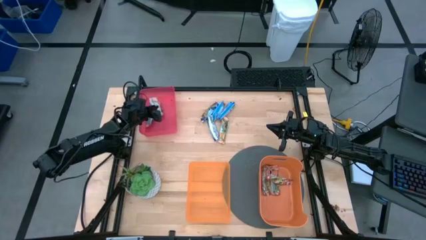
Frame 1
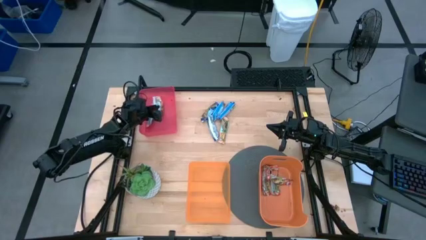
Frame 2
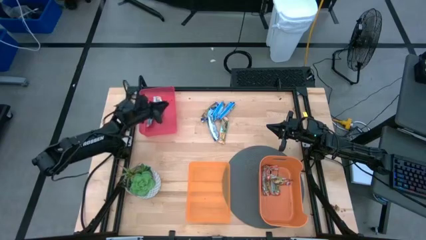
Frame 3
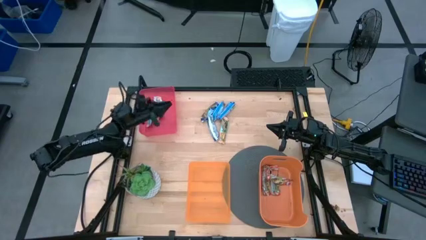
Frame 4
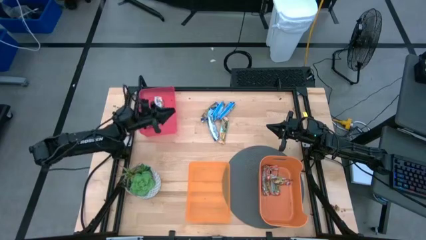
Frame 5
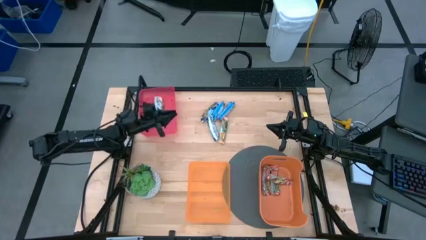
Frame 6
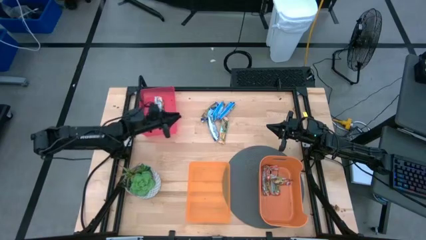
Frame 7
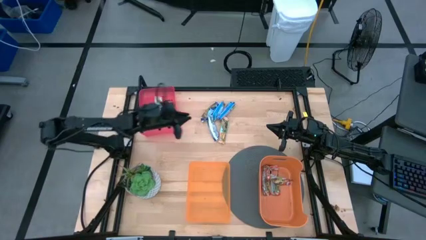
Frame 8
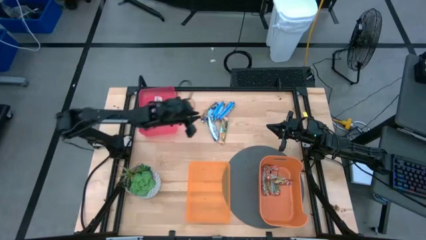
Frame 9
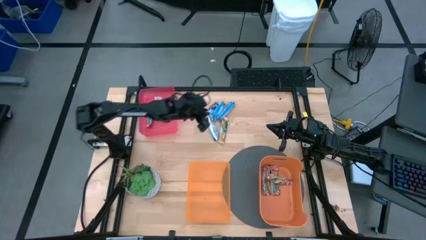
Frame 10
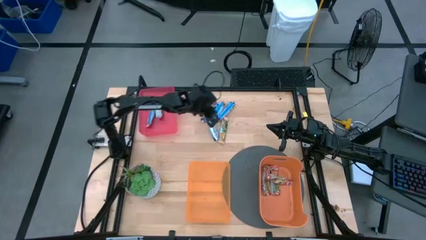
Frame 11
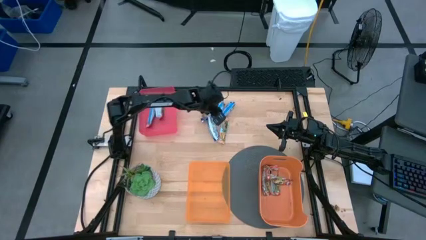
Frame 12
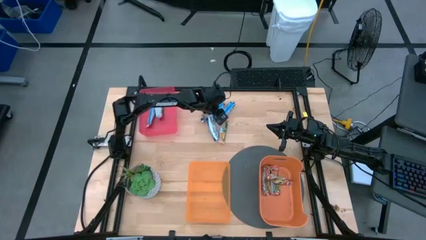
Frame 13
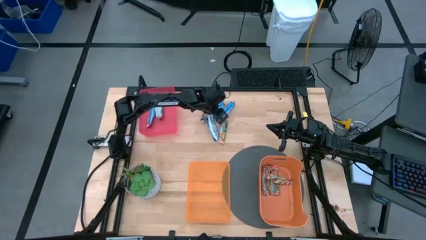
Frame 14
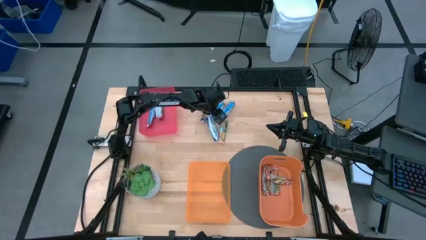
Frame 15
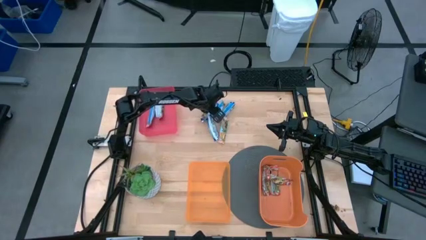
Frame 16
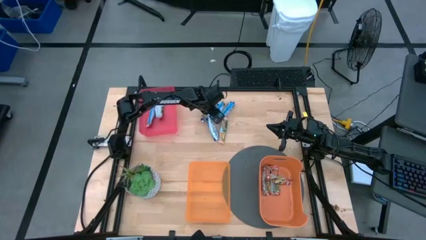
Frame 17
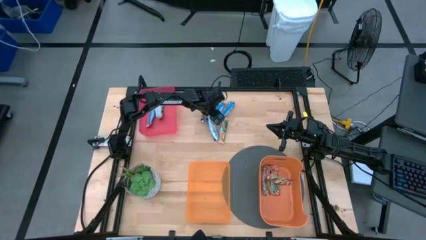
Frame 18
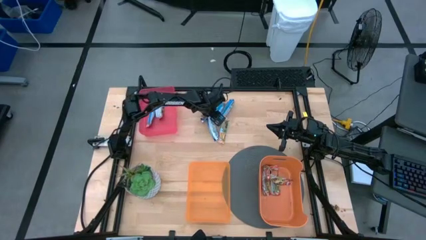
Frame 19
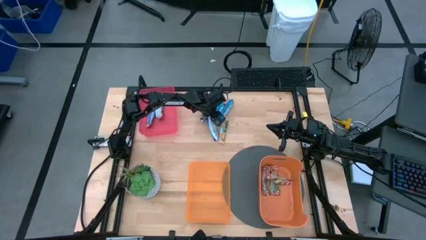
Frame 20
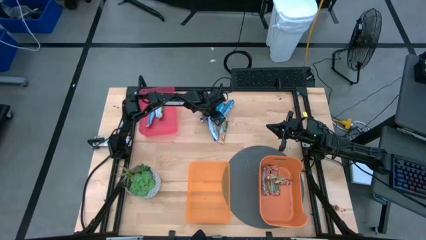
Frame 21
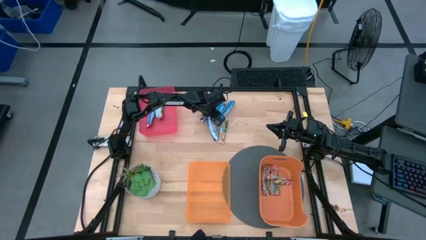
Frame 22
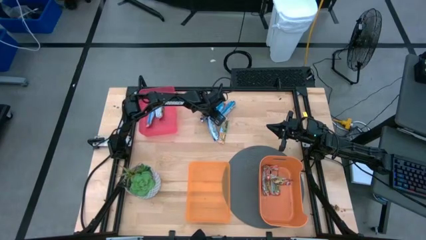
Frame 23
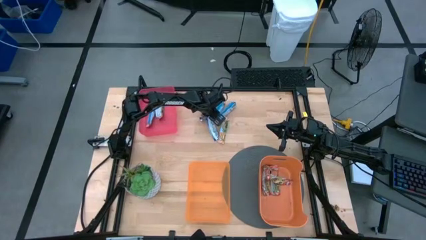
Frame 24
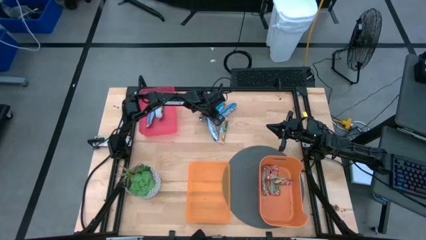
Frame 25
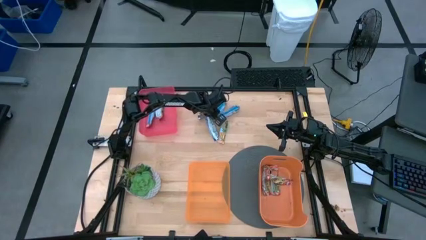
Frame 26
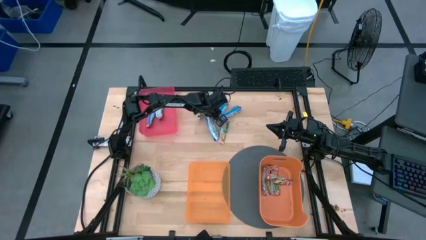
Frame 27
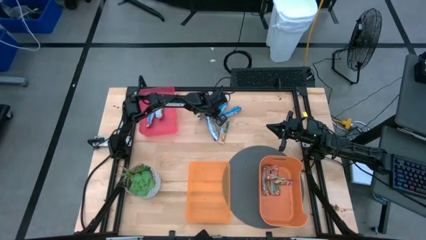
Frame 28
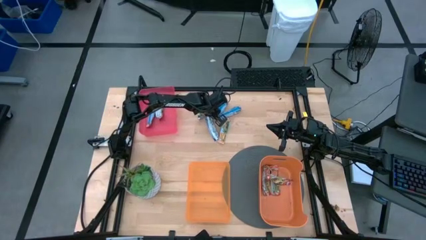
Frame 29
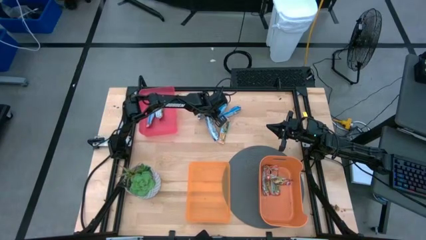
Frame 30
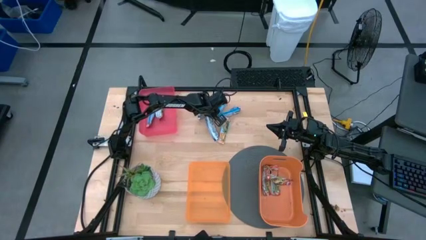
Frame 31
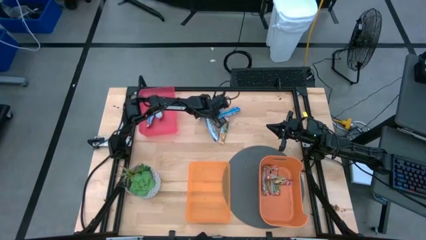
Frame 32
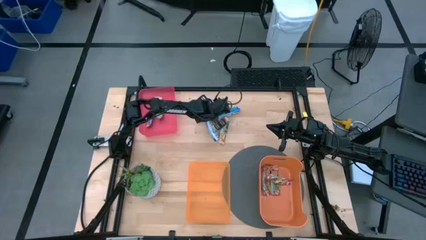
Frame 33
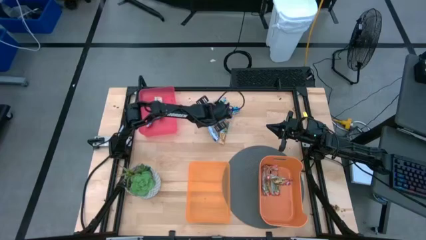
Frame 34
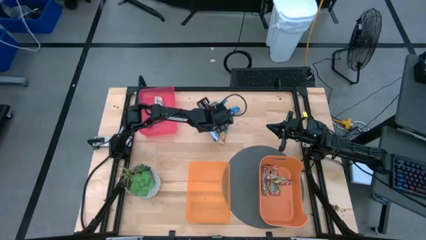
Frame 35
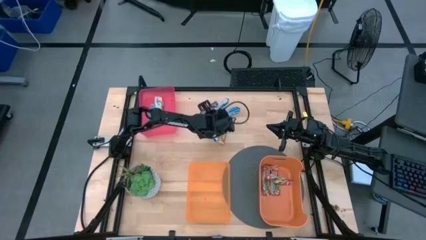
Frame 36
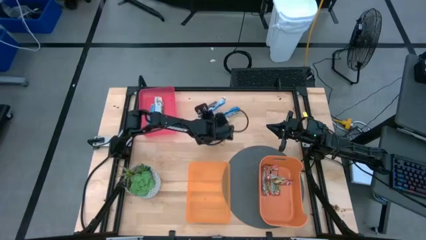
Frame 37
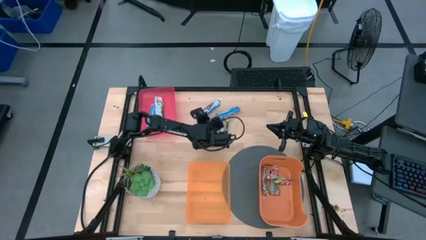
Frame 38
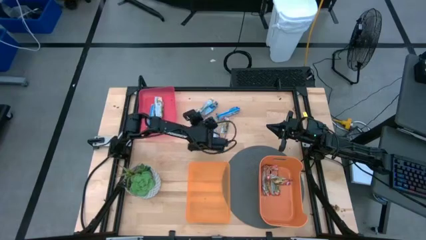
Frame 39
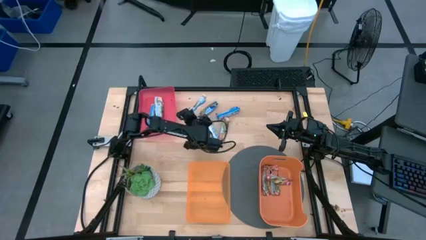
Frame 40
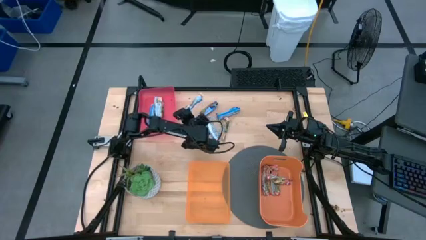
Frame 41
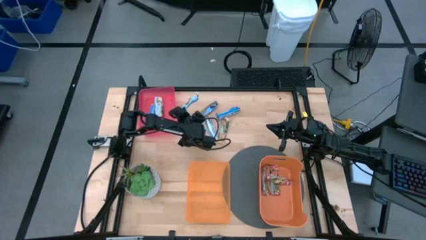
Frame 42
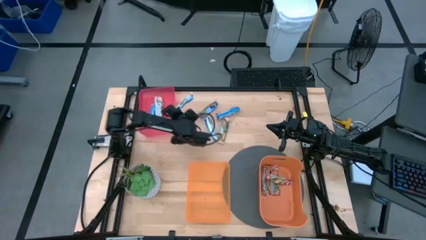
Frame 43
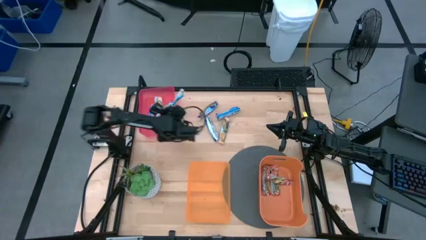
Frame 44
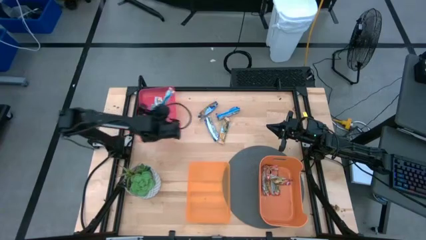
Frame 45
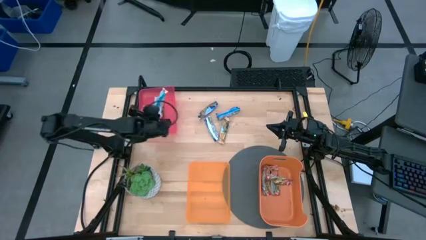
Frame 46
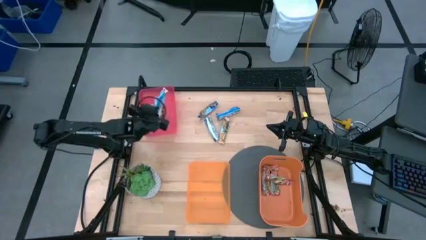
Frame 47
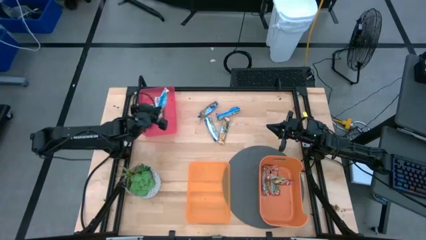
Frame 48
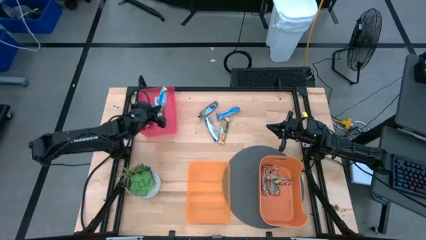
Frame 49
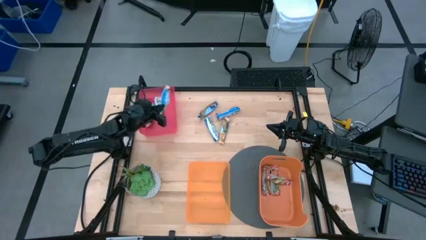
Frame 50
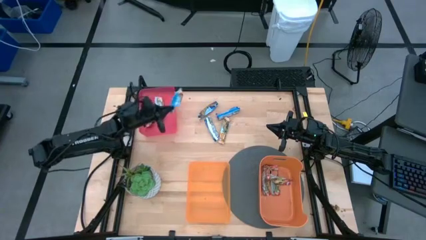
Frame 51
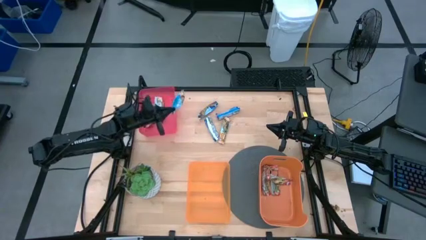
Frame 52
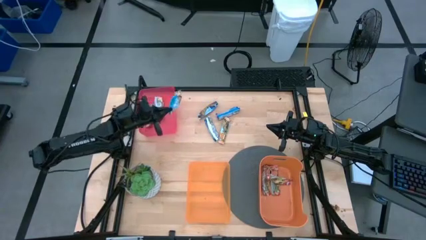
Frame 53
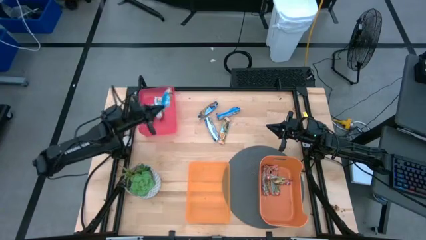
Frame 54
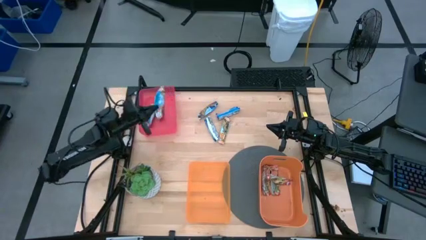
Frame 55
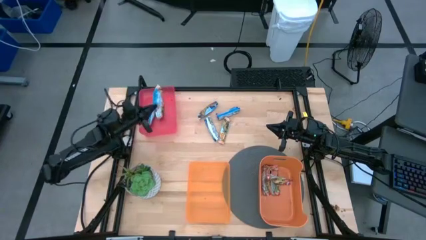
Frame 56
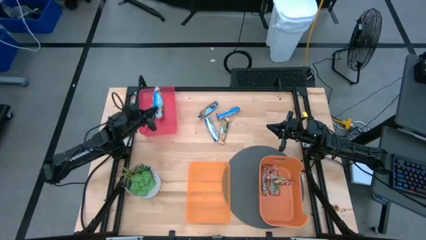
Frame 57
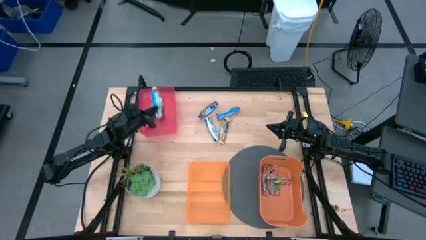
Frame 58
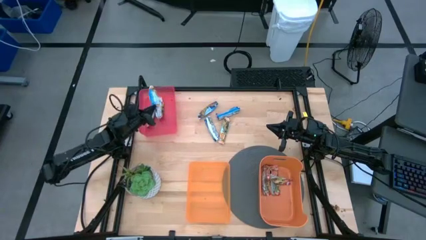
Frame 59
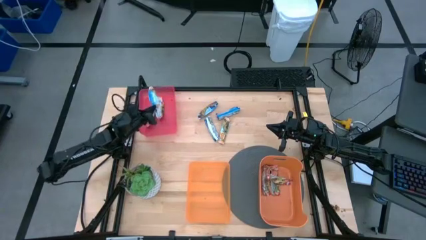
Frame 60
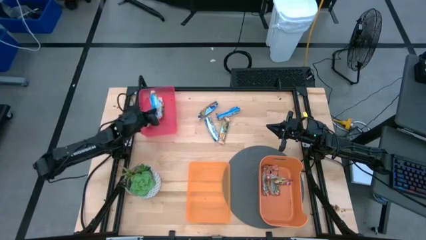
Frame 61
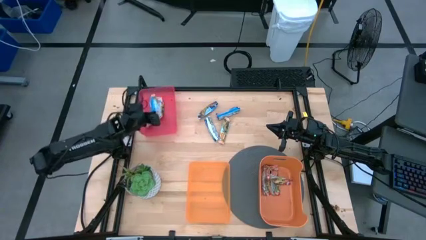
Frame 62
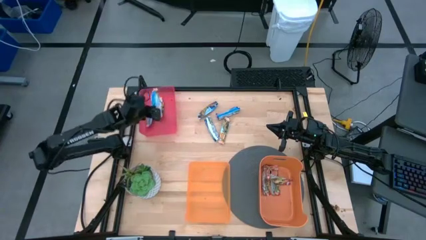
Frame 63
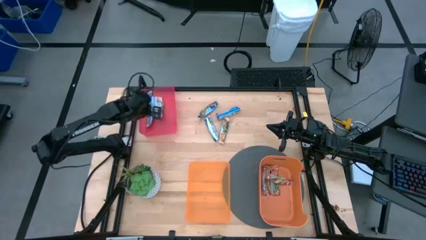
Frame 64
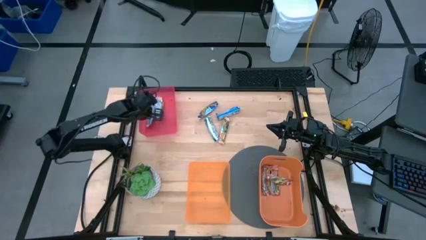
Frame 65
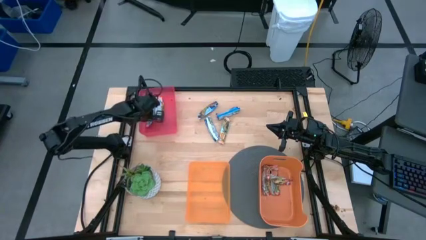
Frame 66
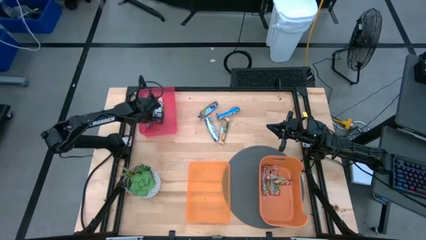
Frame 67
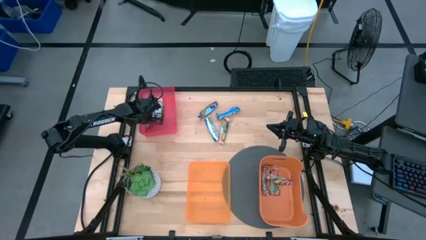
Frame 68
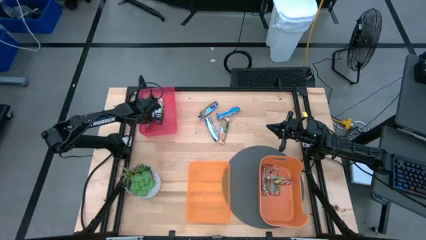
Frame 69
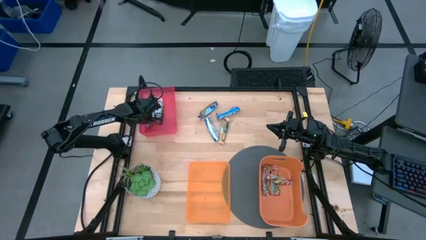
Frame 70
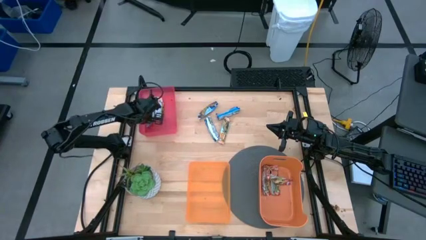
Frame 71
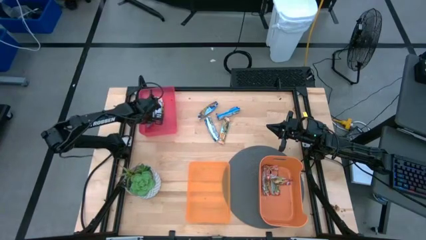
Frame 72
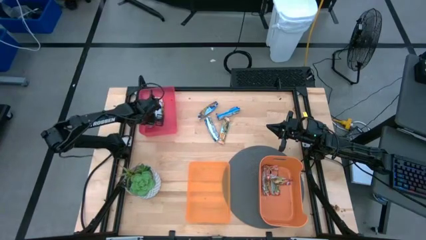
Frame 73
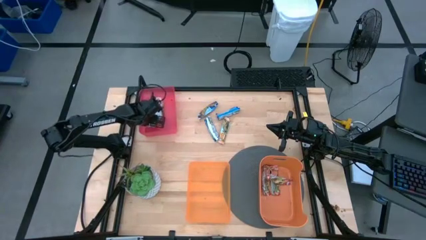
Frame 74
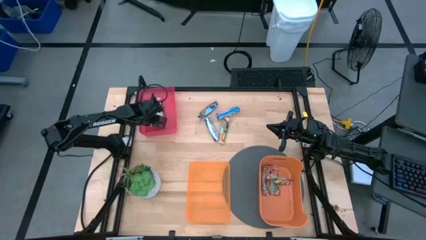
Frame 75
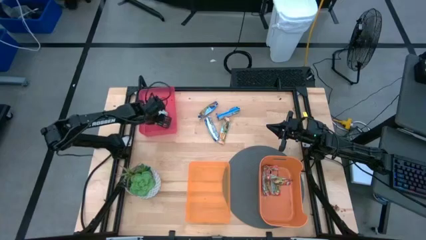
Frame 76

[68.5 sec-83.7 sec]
Task: Pick and place Granola Bars by type
Put the top yellow granola bar into the red bin
